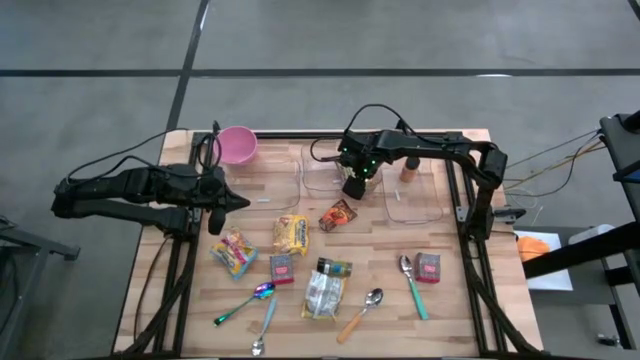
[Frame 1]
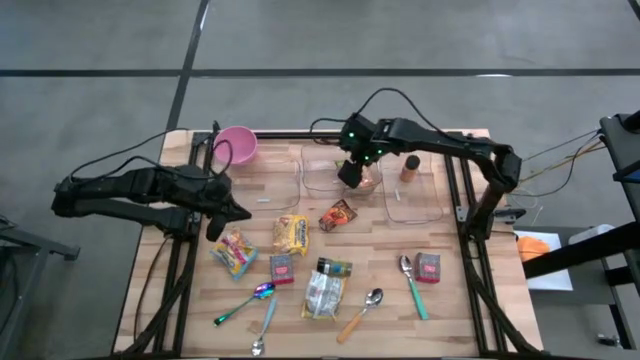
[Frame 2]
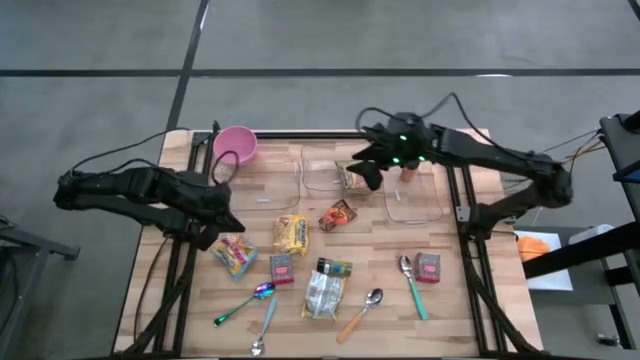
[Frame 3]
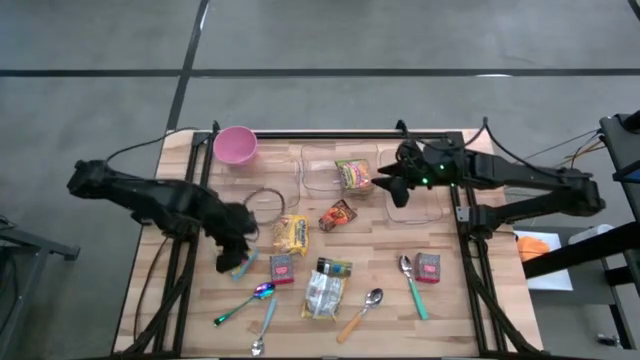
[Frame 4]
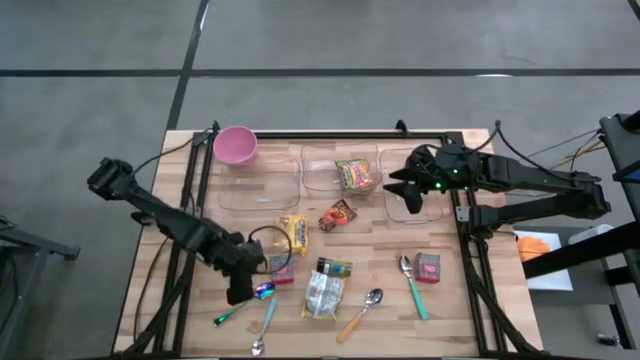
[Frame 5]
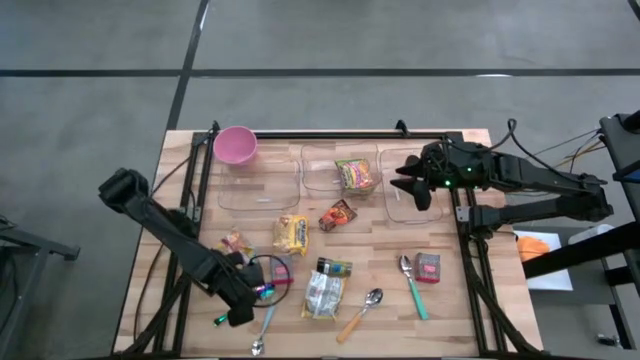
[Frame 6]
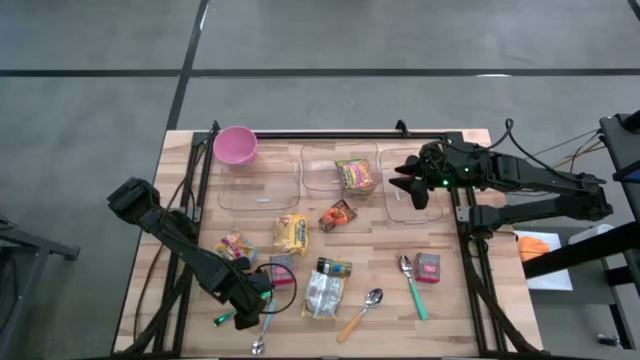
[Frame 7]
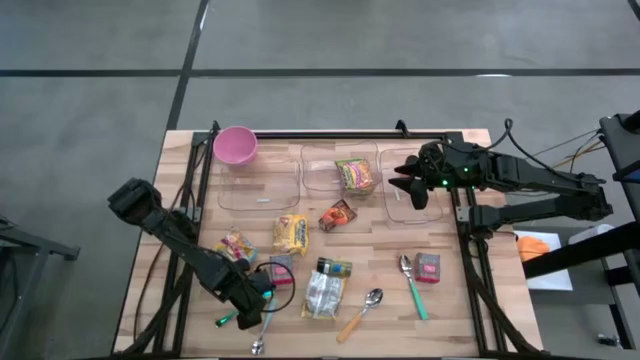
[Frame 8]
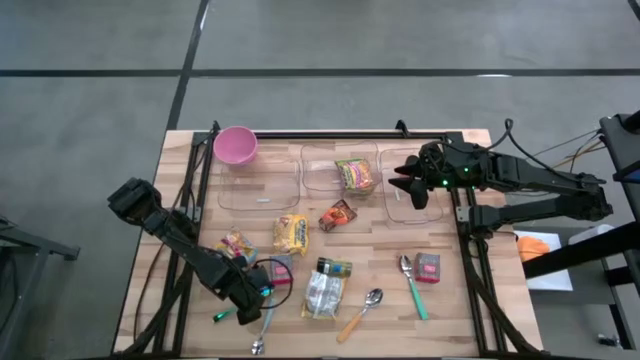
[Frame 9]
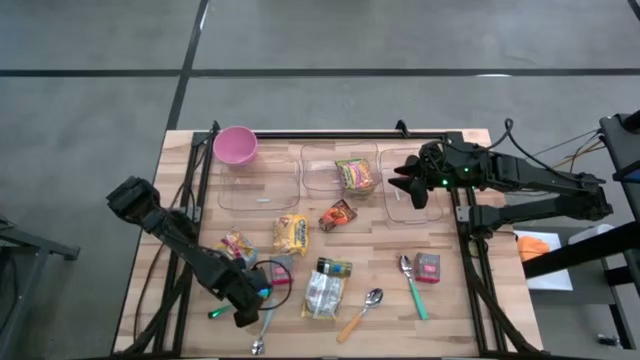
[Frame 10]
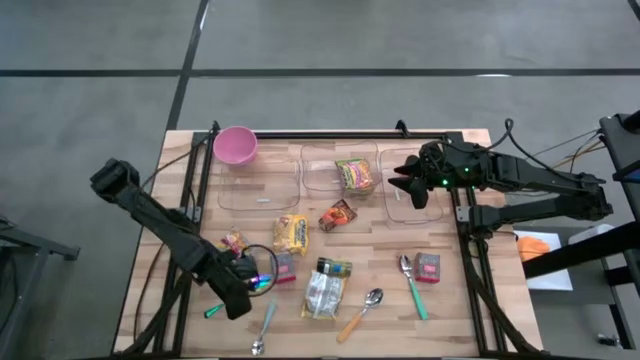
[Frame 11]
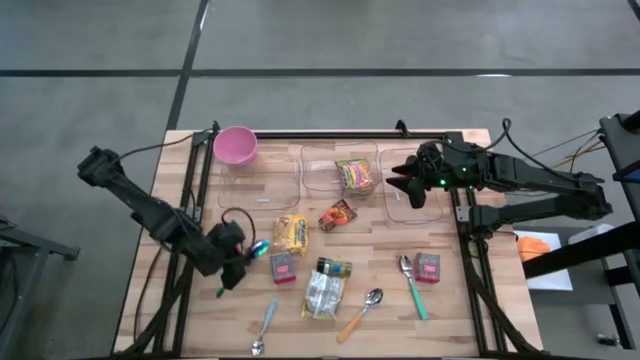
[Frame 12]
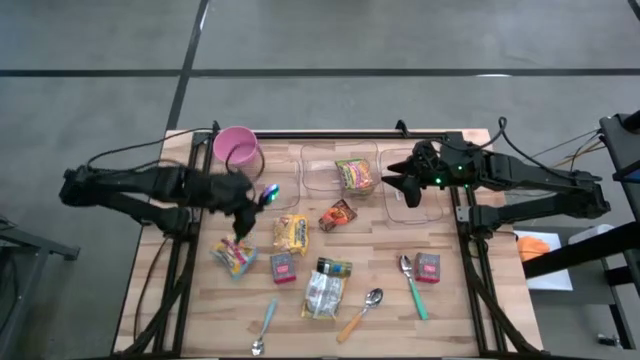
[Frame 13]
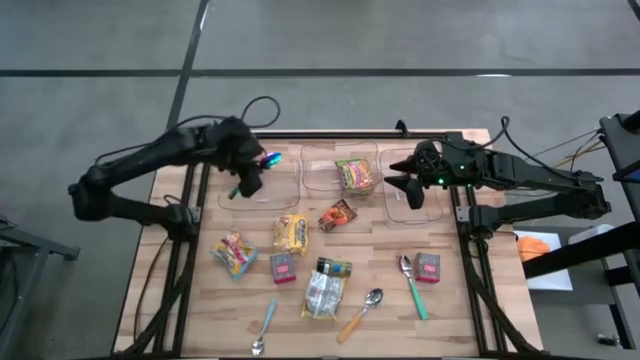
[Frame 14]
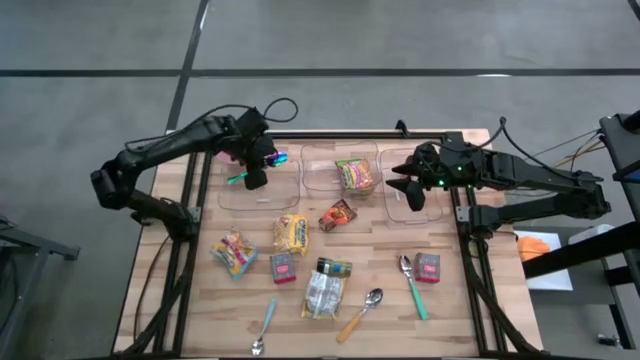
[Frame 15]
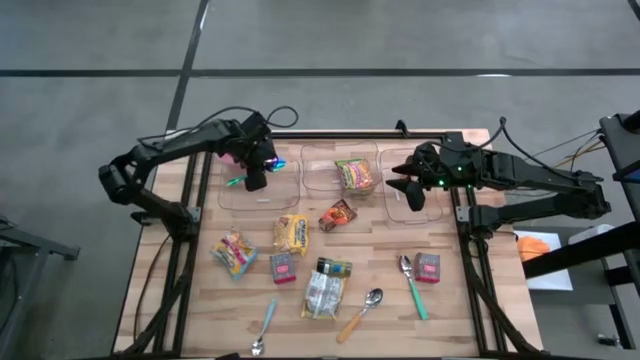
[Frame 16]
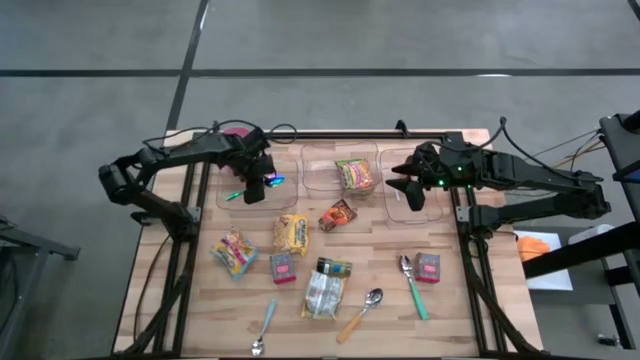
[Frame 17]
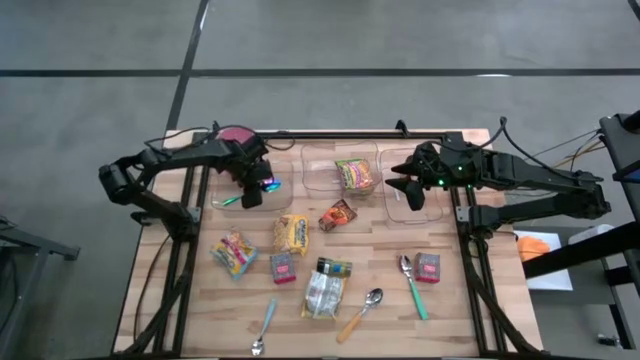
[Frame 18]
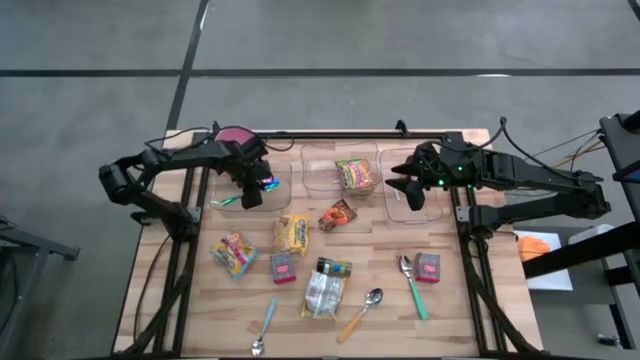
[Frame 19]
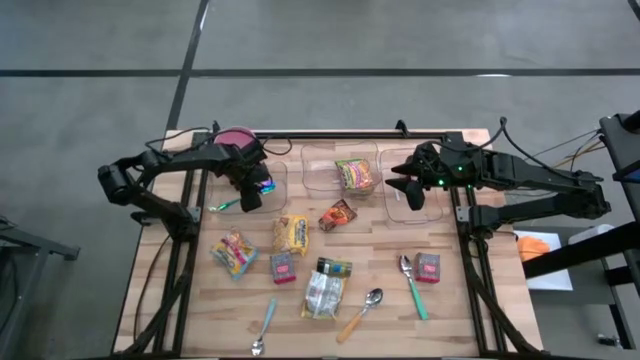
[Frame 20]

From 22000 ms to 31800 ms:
Put the purple spoon into the left transparent bin

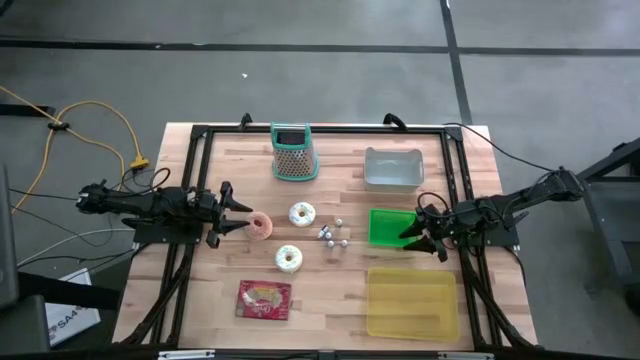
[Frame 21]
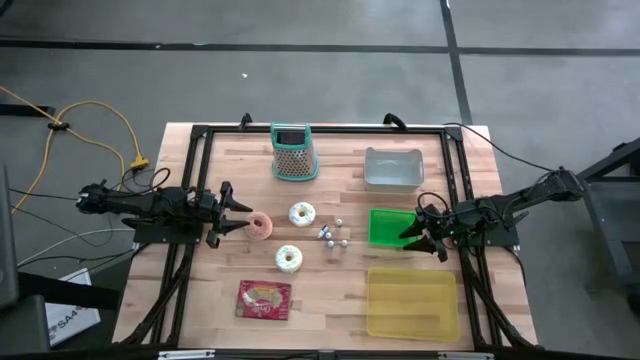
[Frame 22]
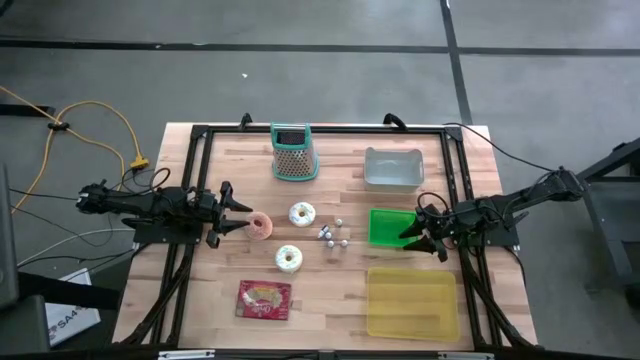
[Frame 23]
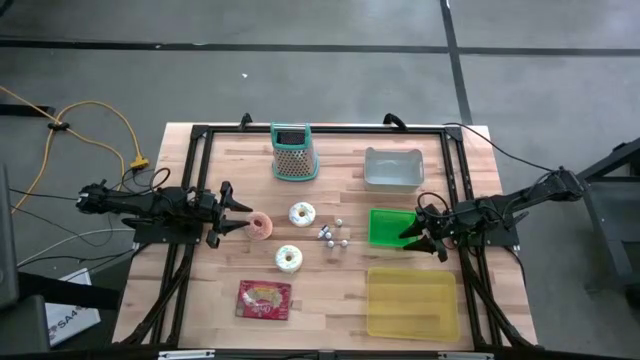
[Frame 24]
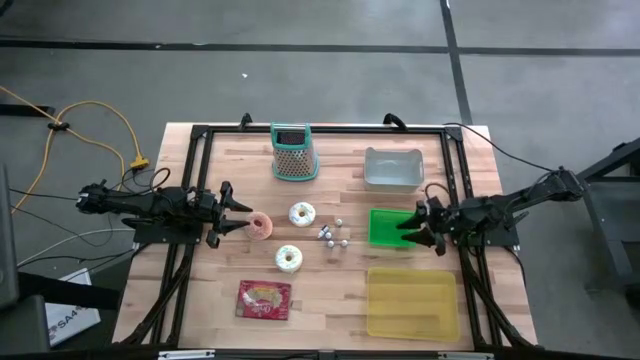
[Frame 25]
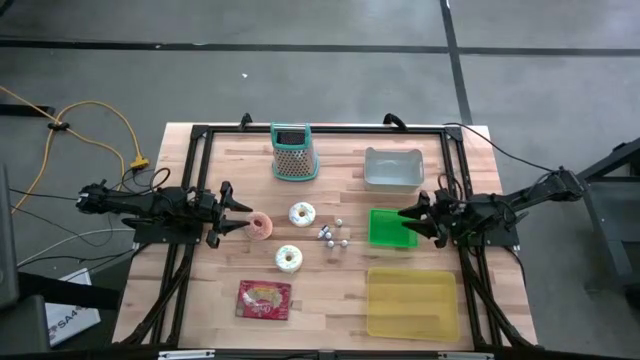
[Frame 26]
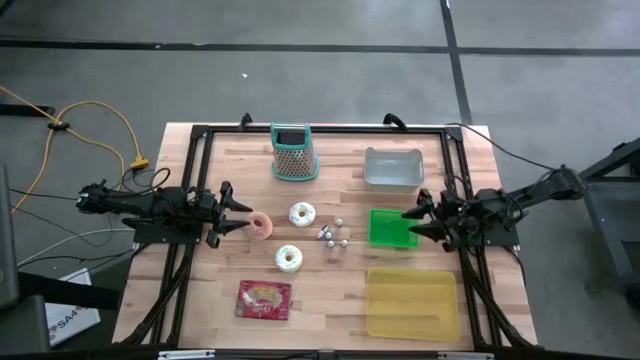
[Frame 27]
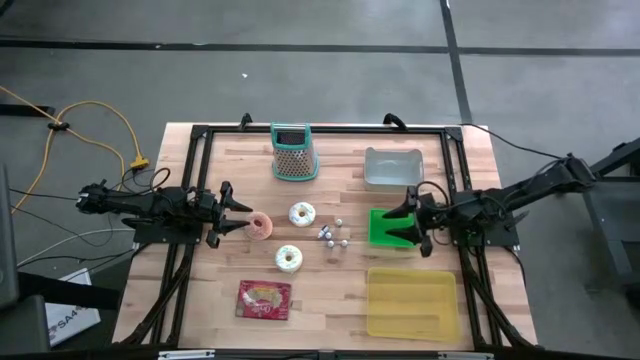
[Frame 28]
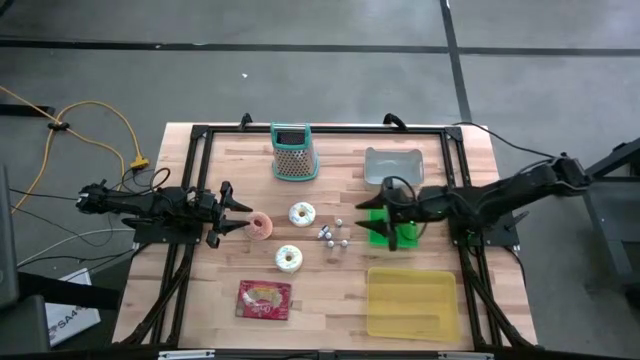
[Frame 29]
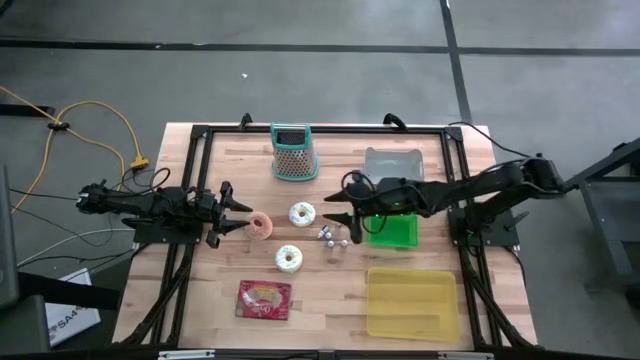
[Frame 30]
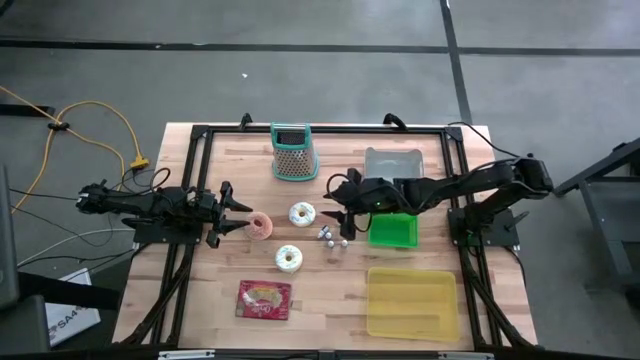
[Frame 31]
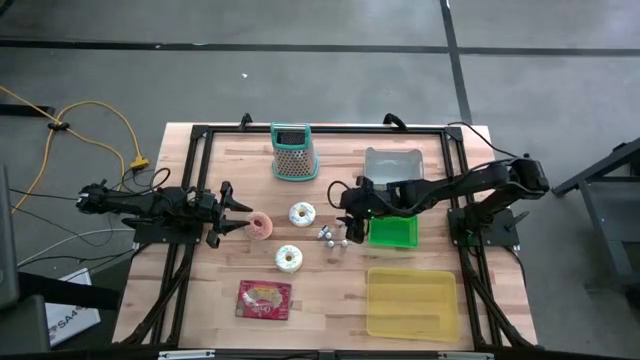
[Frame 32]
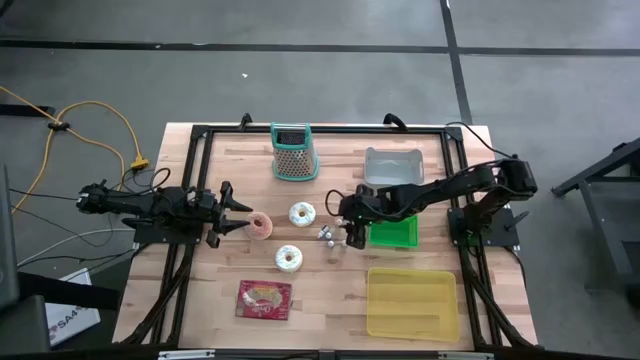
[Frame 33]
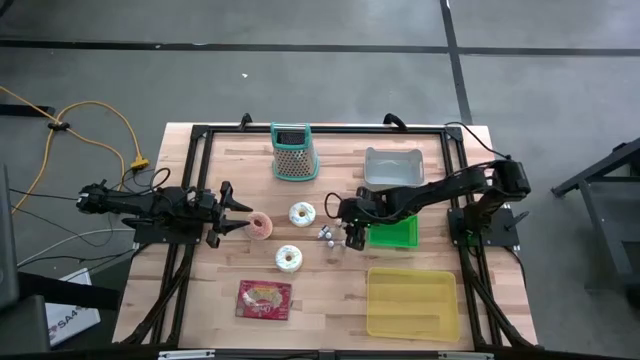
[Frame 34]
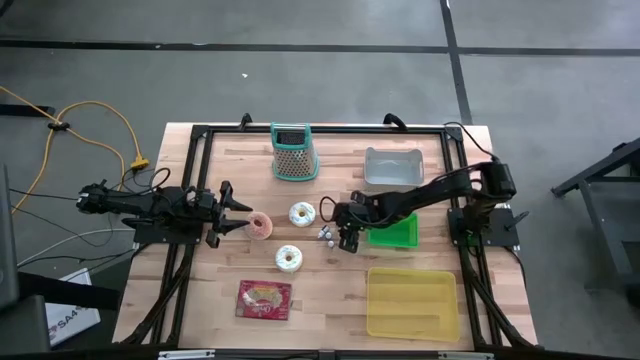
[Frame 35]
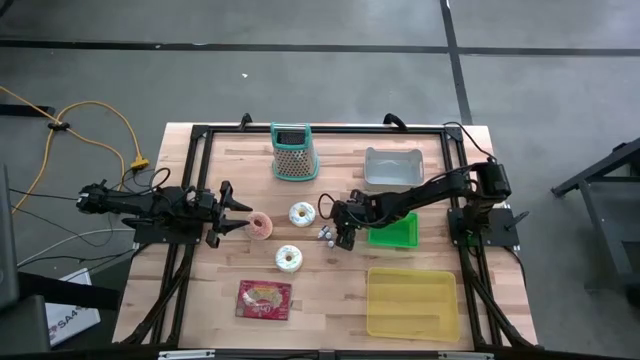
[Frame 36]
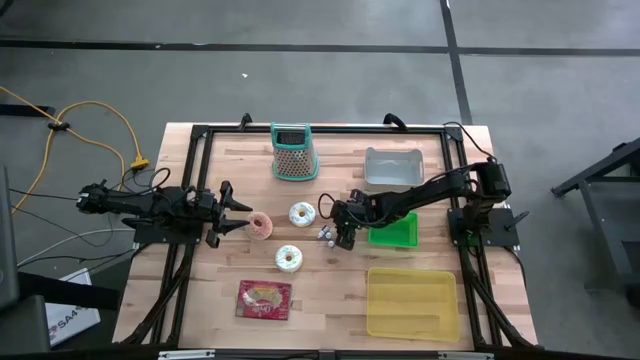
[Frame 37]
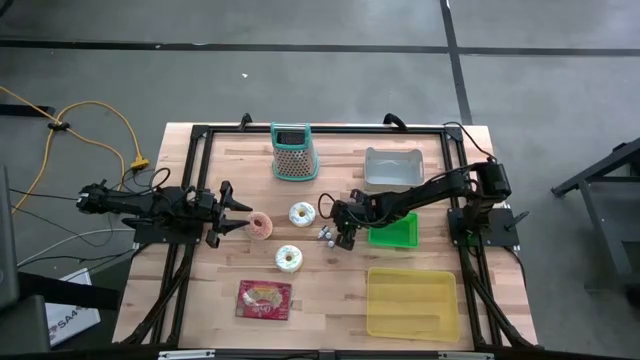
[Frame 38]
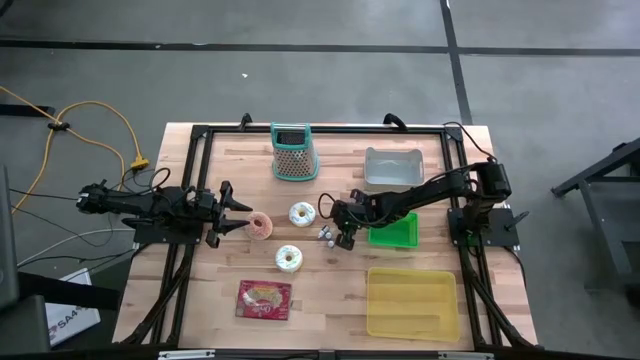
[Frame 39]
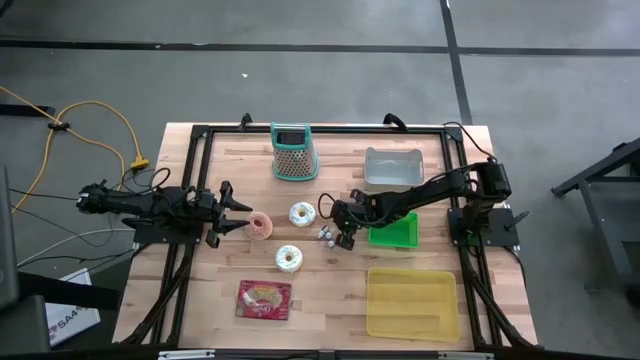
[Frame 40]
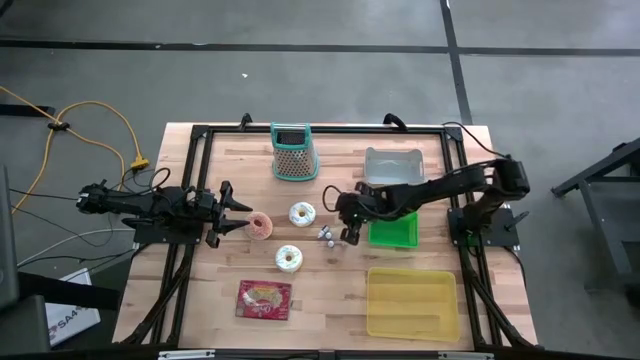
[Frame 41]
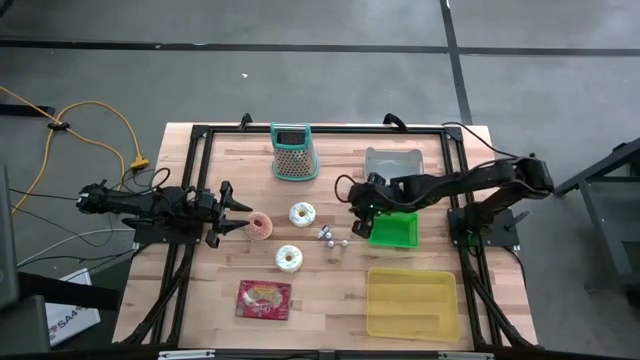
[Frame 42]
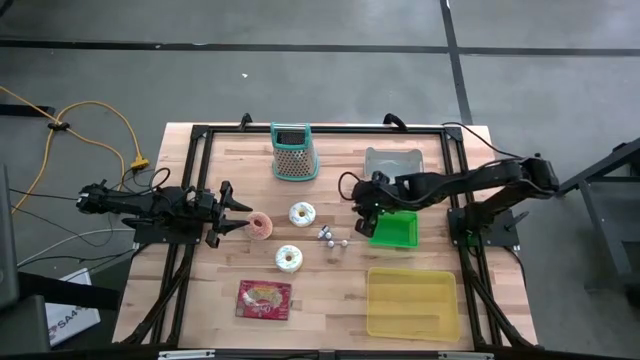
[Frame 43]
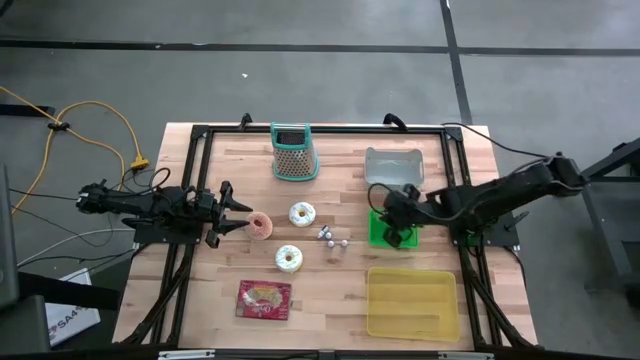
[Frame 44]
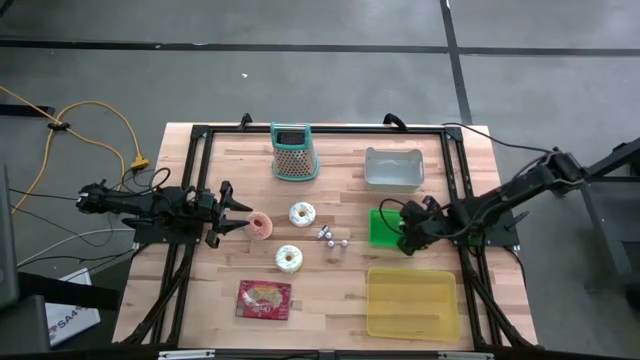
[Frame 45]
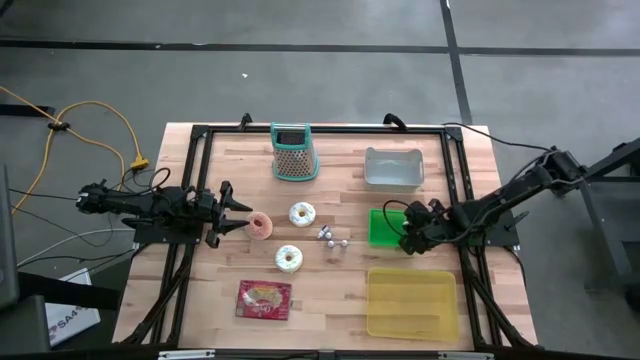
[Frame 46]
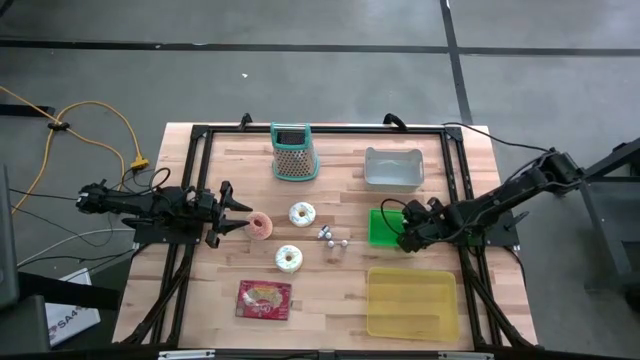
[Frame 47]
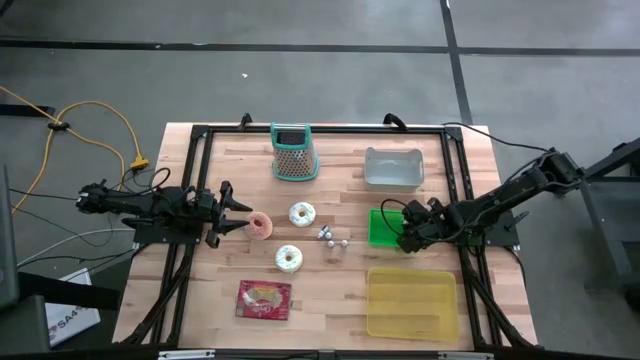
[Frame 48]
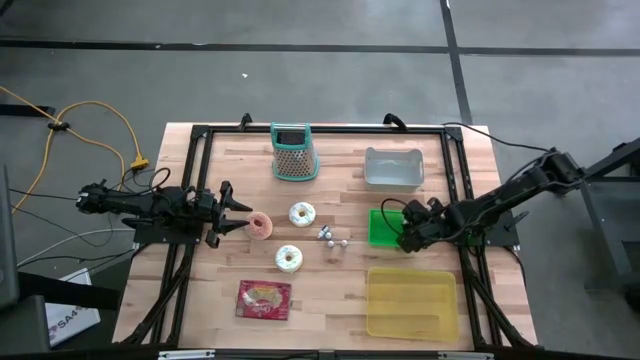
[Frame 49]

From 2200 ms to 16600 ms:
Put the green food coloring bottle into the green bin
